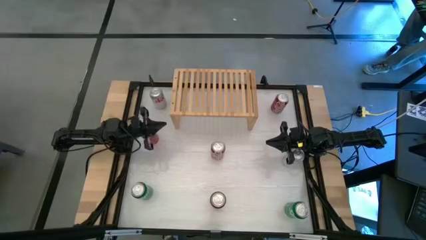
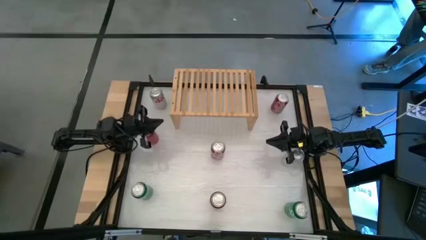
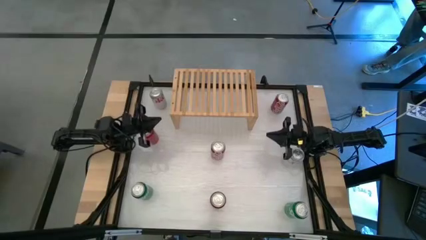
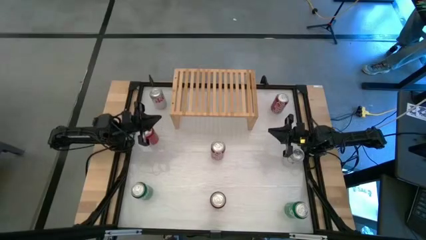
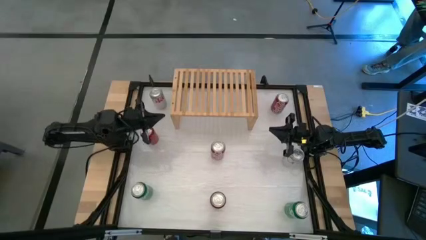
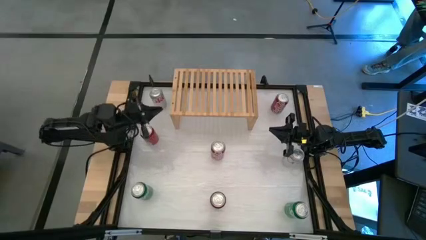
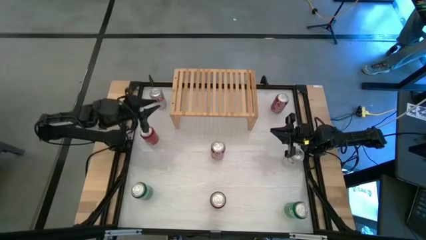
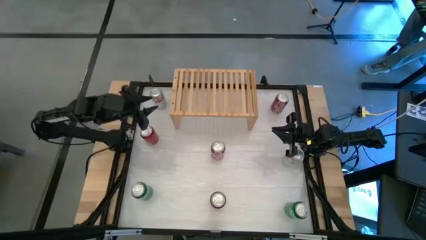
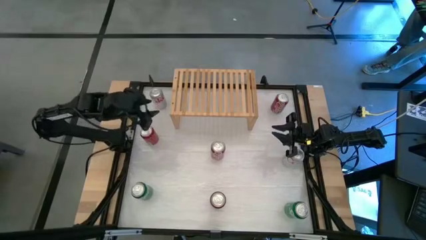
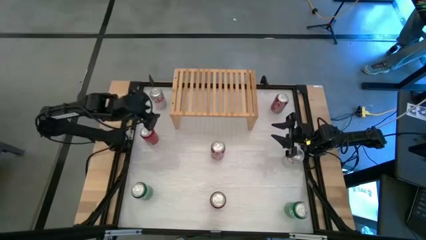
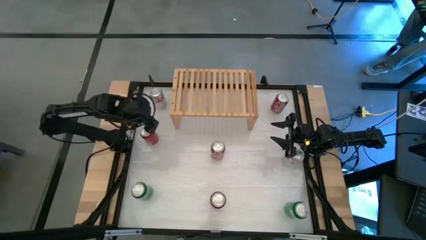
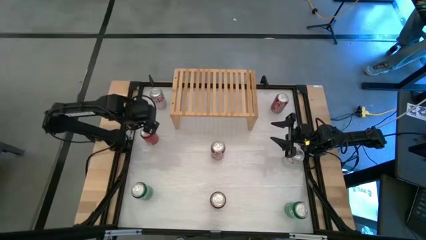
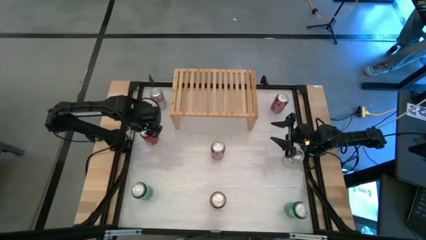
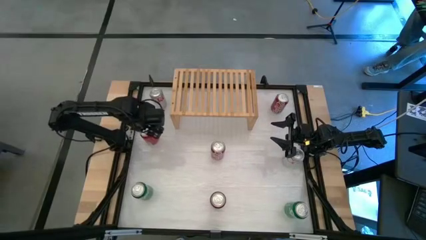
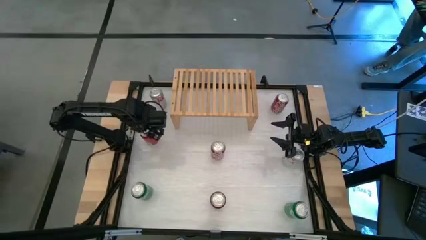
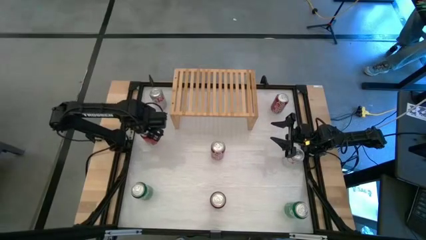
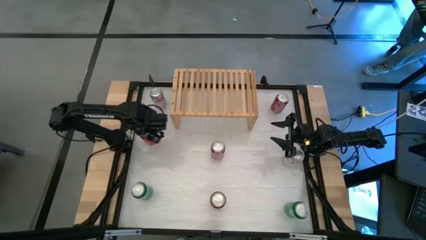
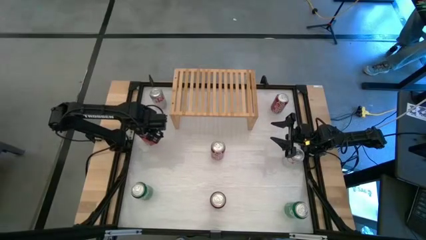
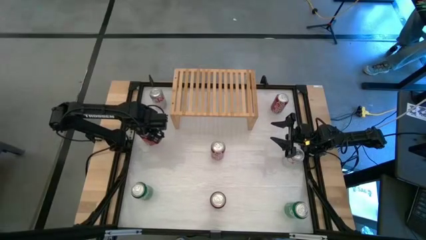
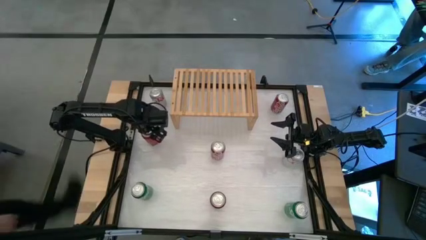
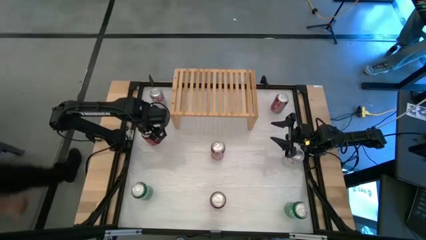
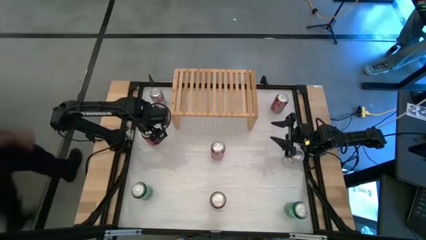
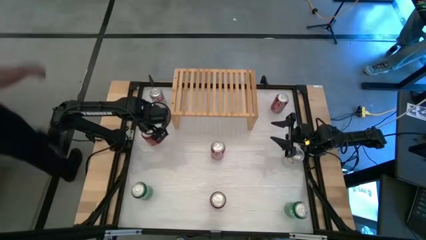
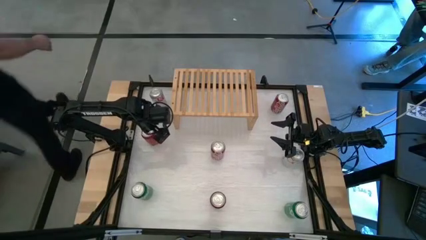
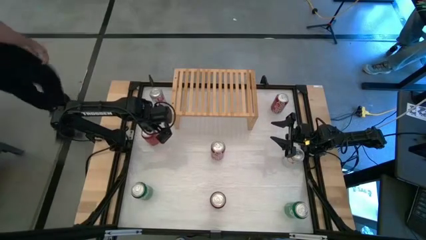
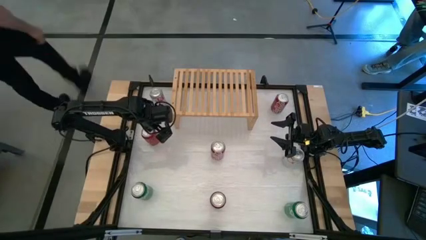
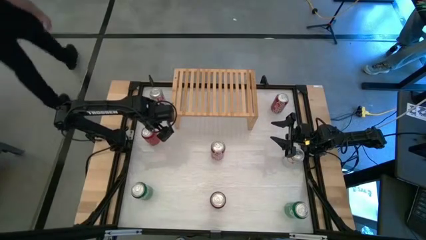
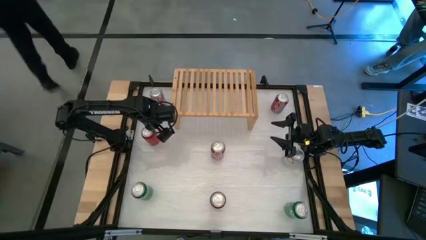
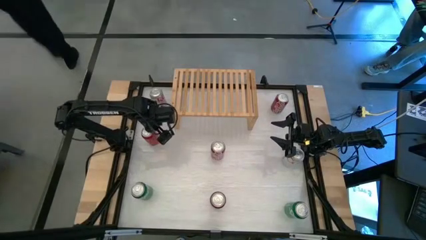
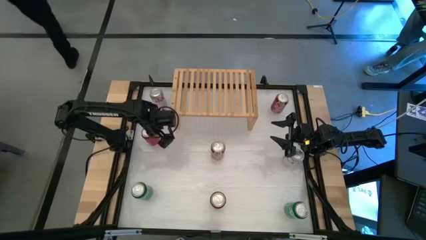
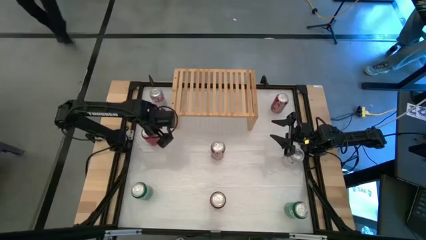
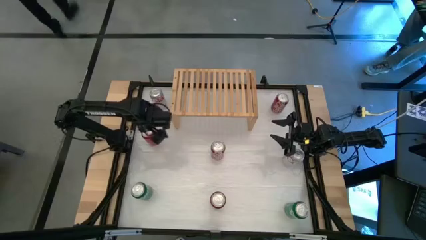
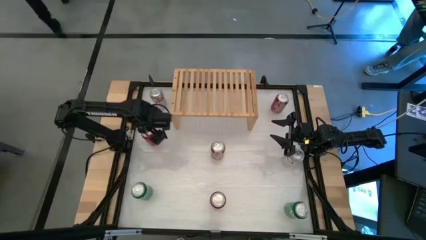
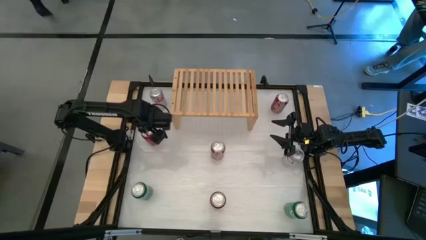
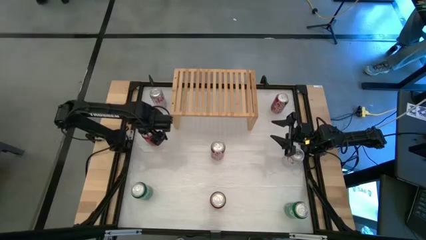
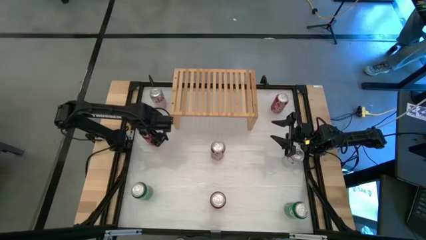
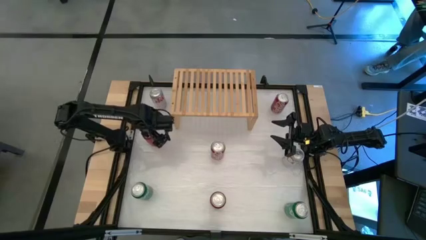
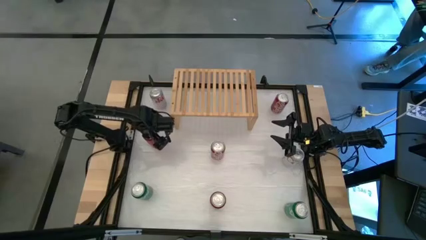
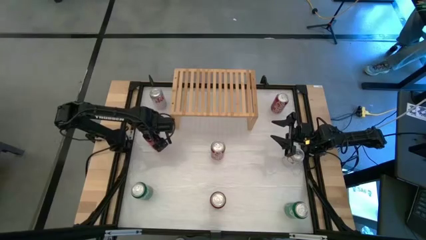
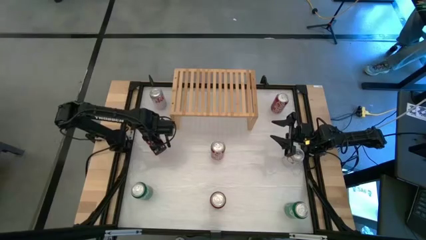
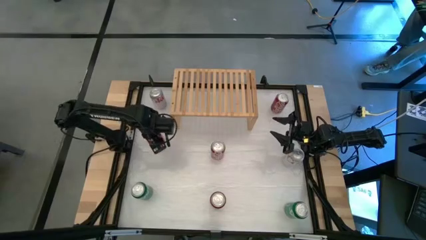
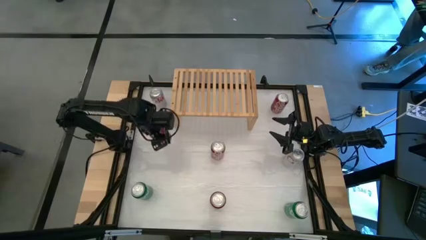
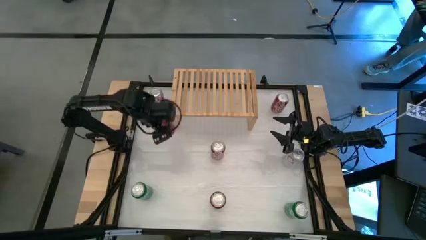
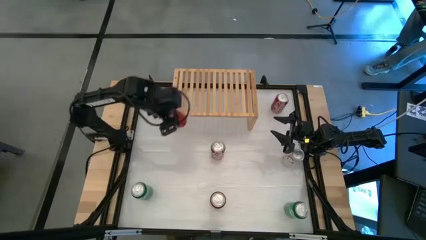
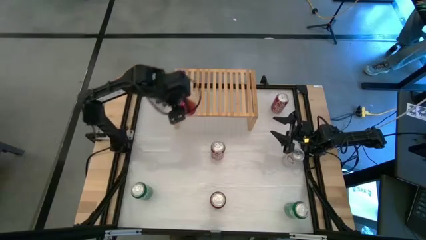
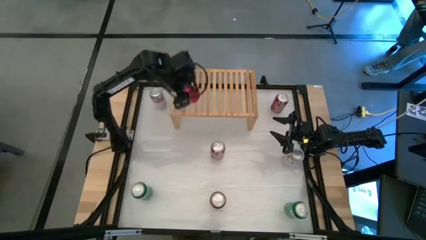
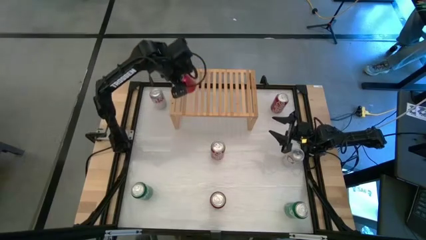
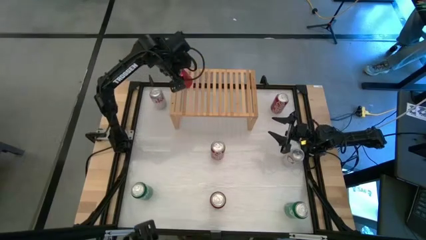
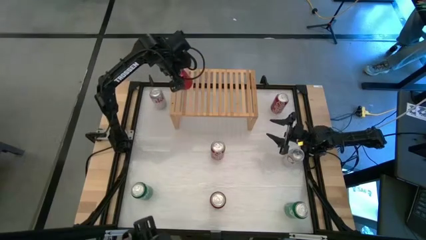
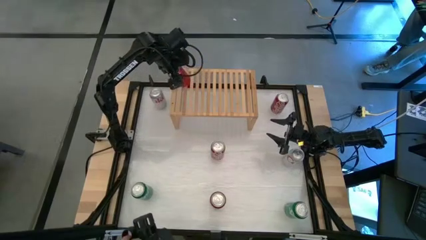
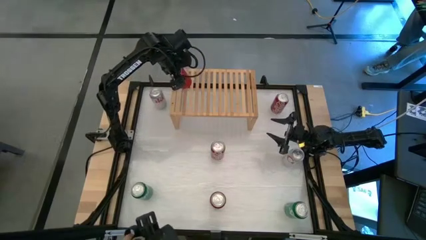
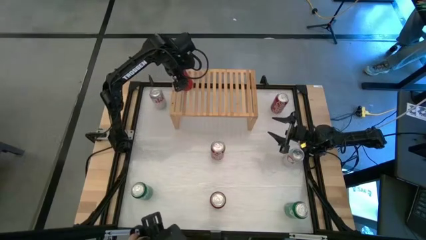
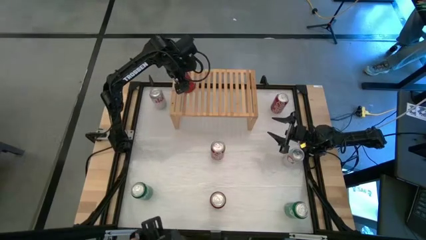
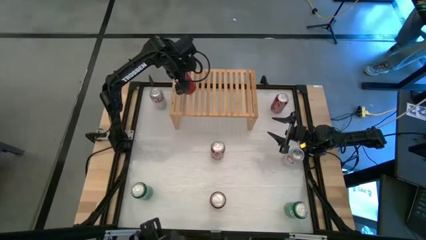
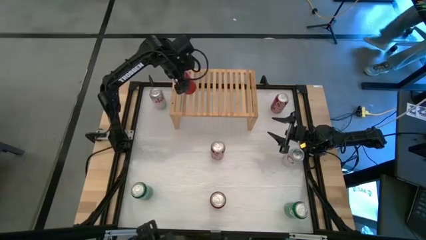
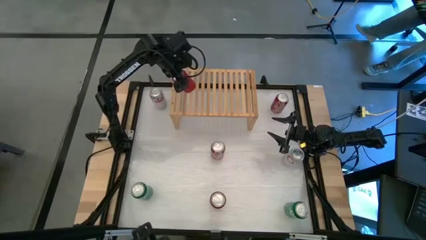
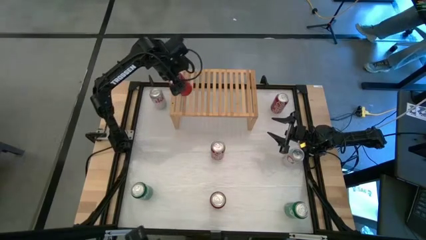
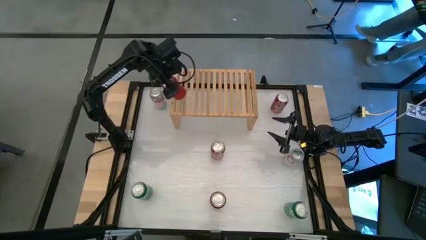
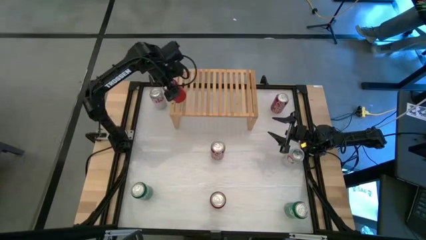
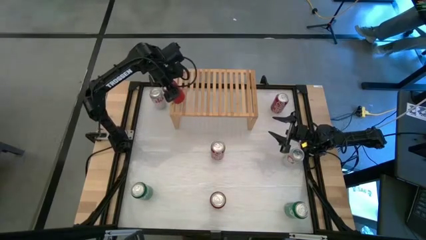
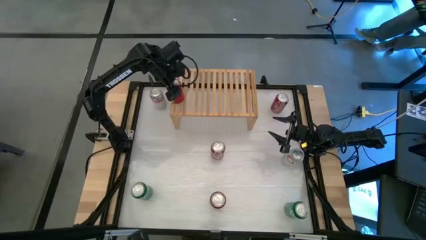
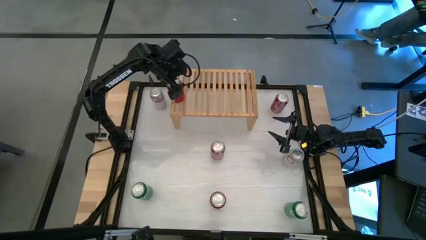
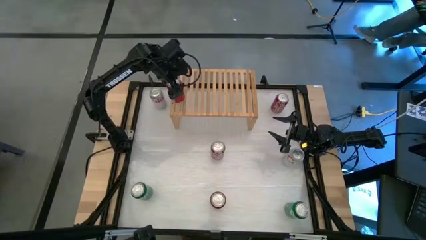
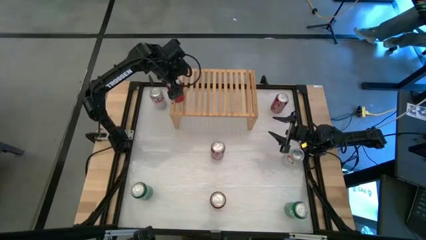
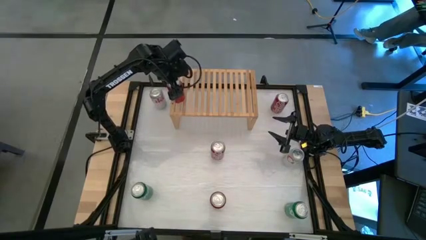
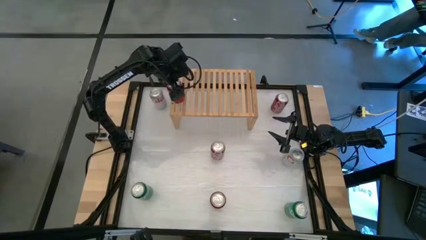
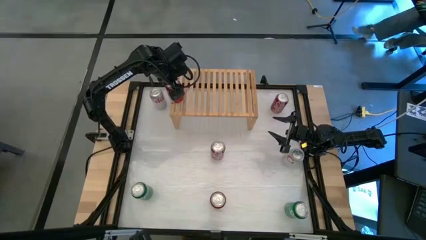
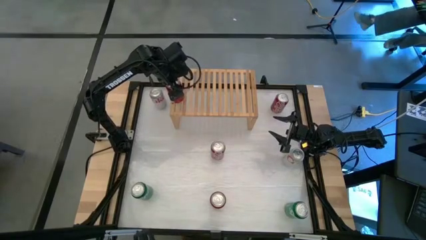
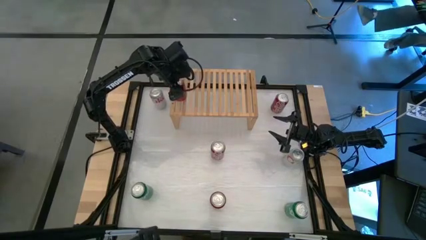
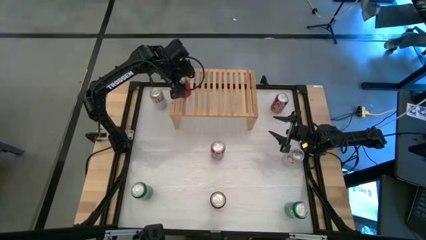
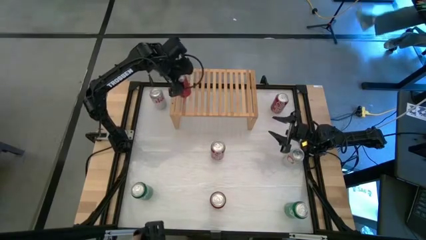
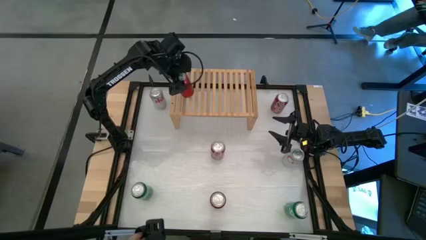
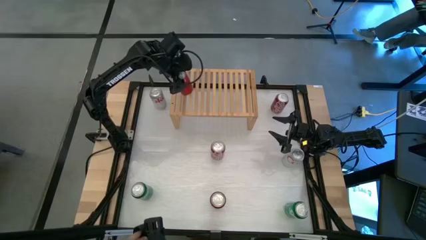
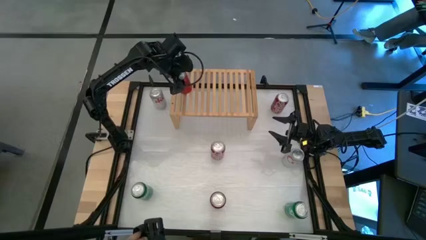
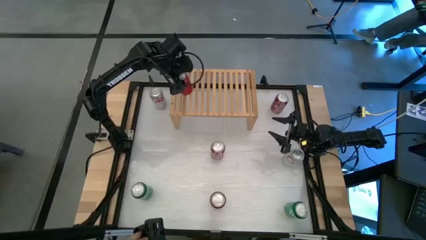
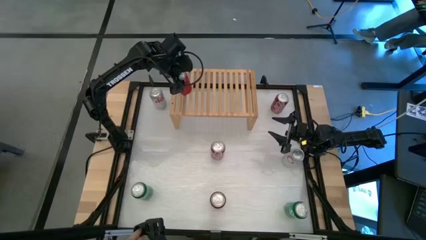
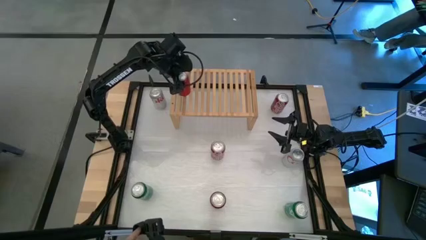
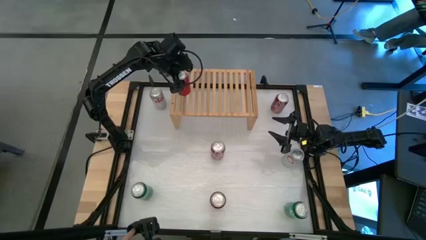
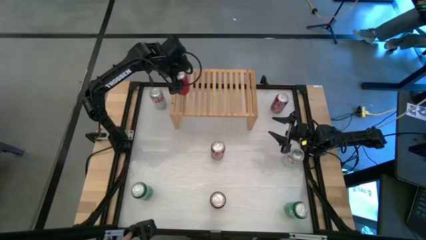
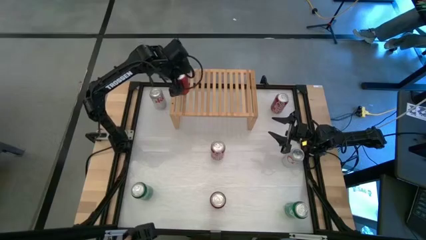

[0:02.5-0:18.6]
Task: Place canned beverage on shelf
Put the left red and black soda can on the shelf
